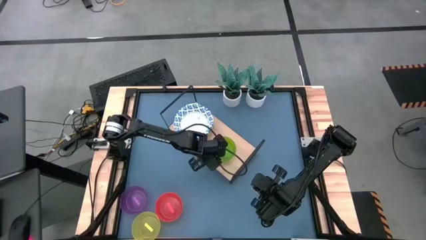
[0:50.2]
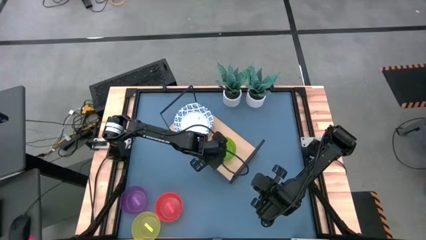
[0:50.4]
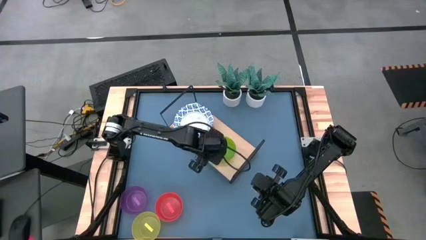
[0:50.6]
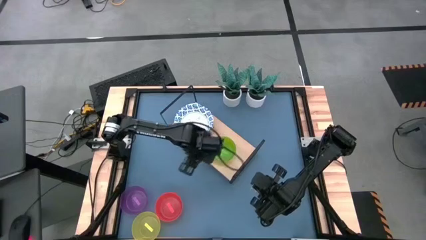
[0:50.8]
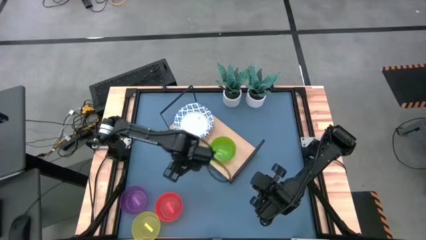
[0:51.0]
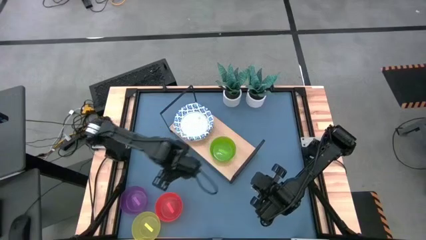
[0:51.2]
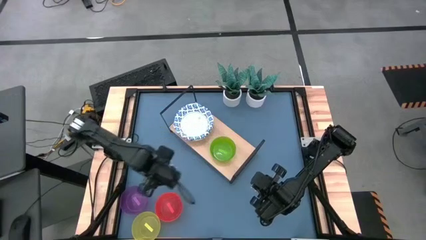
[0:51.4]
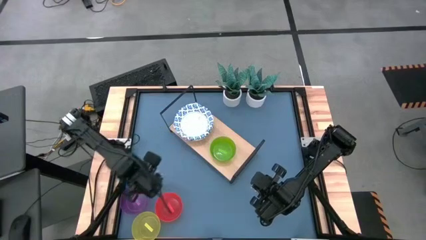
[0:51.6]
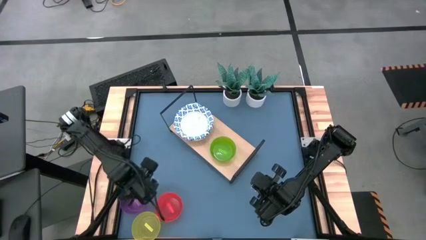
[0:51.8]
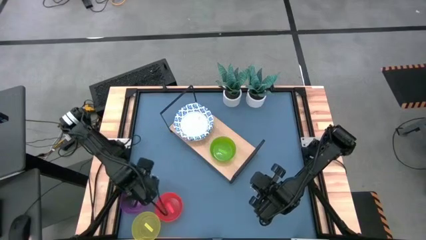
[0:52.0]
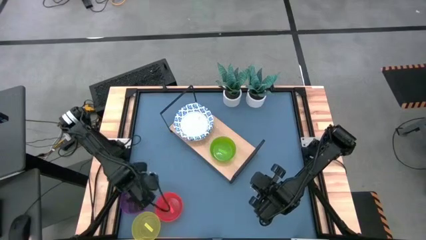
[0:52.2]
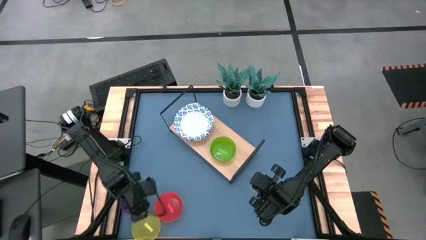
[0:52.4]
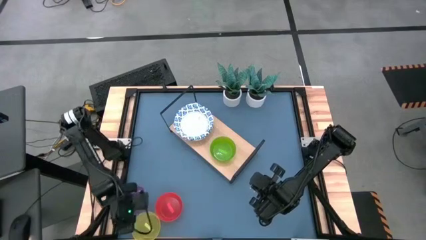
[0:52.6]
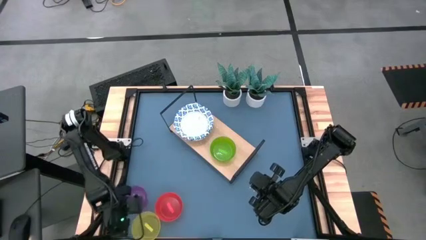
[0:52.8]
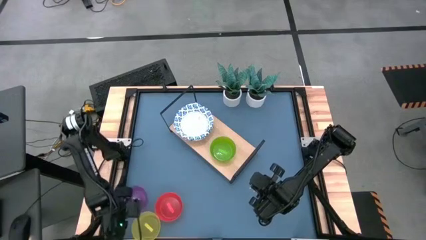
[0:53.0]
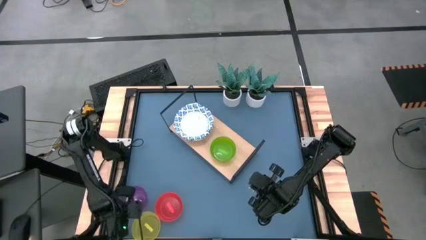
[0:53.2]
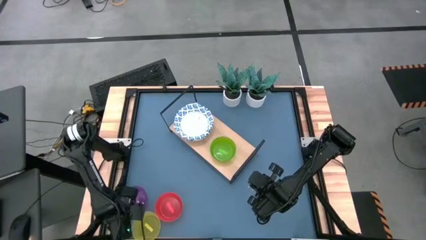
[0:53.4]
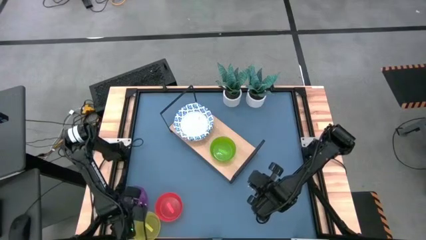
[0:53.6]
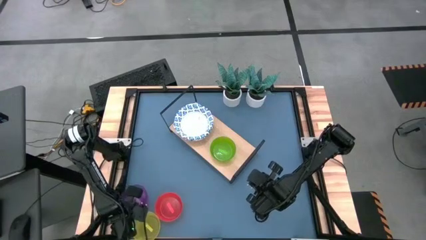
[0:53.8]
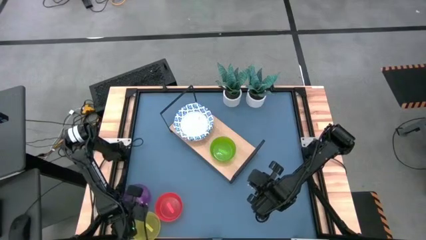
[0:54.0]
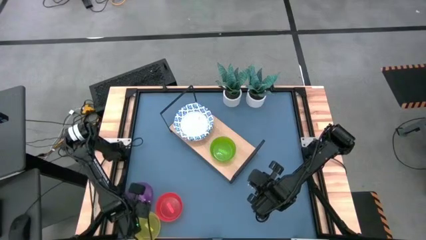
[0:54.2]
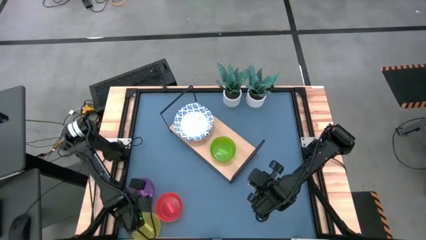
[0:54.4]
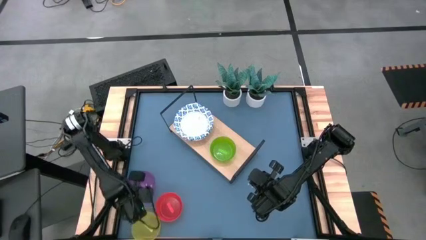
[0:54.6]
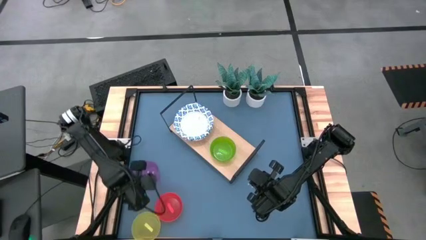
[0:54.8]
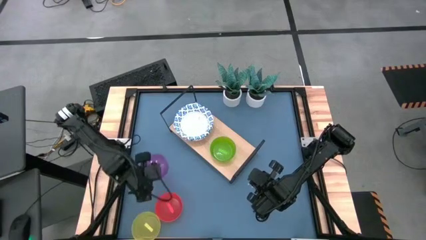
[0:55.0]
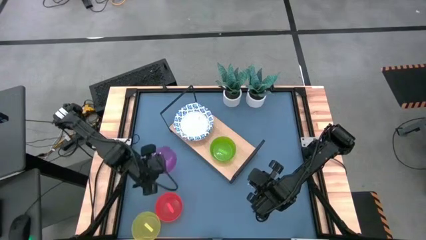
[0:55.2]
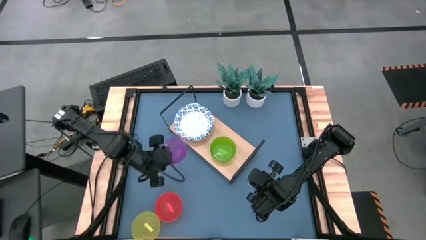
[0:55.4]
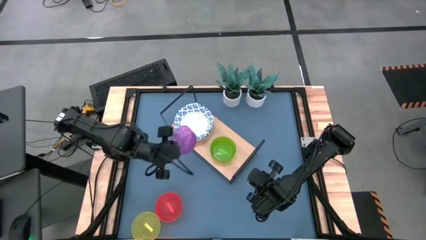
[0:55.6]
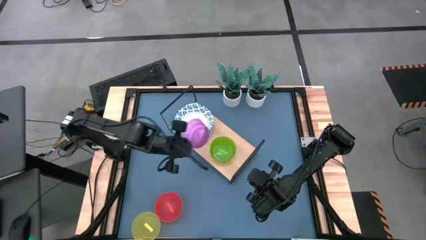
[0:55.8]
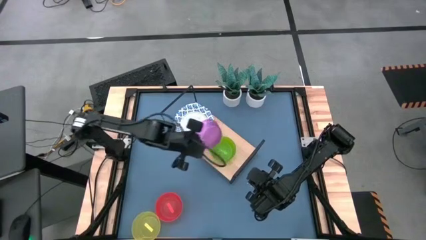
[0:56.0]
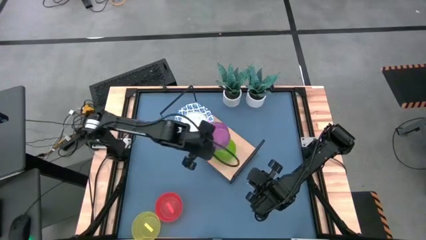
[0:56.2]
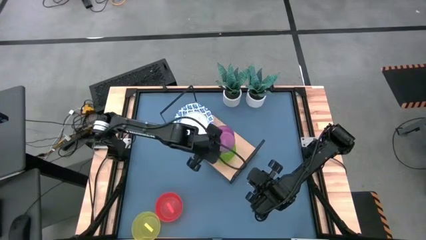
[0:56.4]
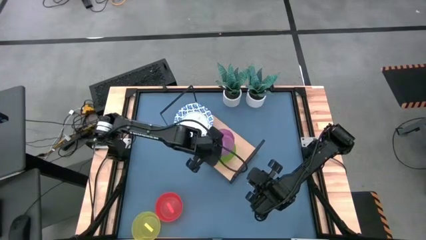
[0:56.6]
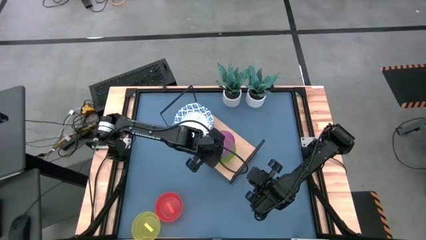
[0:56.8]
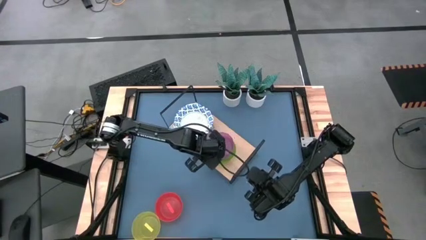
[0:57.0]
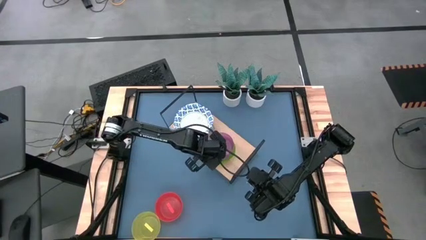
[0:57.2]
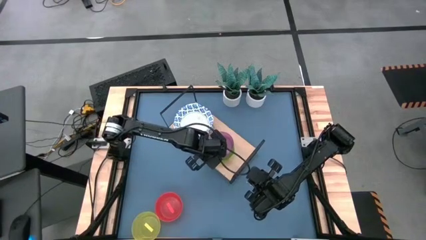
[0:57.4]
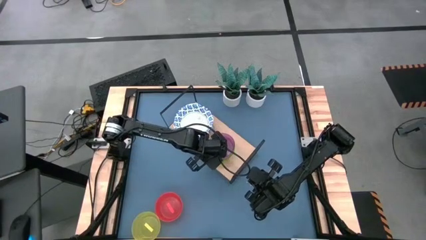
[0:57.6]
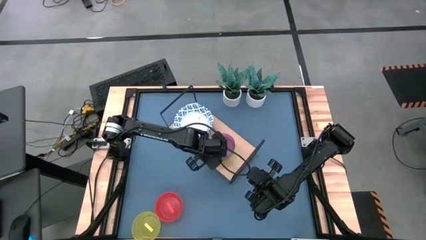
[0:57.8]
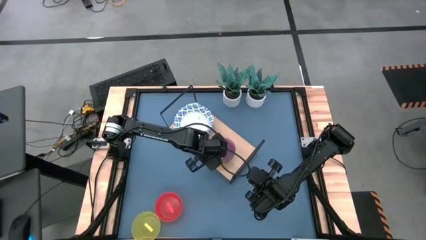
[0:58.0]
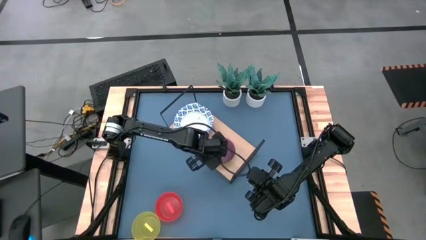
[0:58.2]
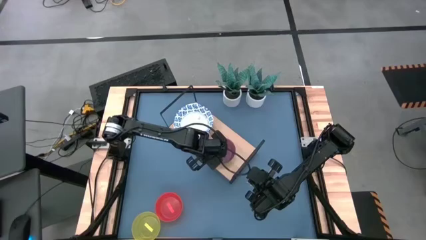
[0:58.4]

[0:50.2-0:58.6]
Task: Place and stack bowls onto a shelf
Stack the purple bowl on top of the green bowl on the shelf

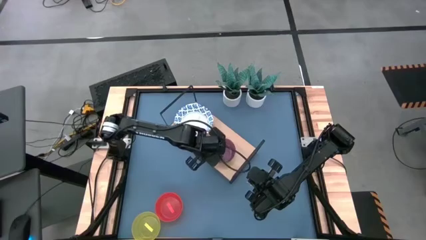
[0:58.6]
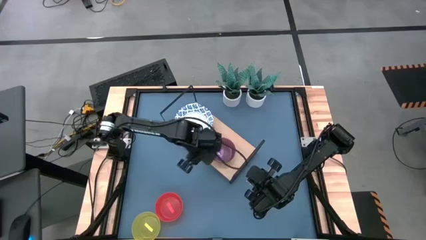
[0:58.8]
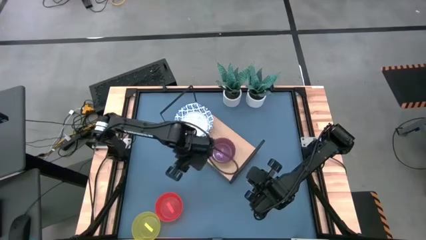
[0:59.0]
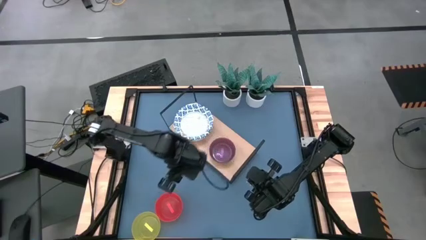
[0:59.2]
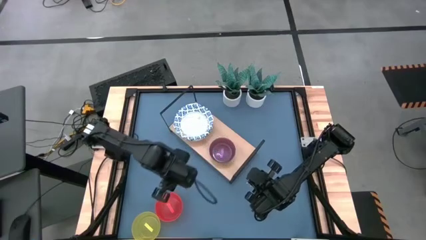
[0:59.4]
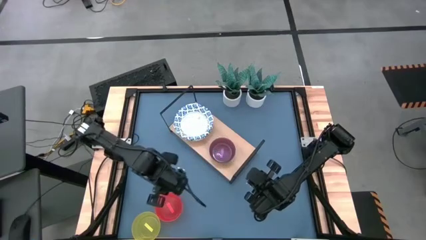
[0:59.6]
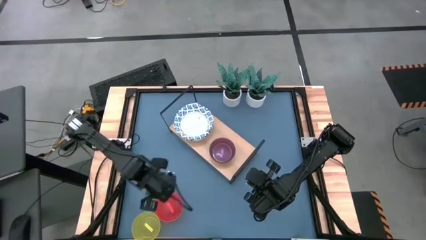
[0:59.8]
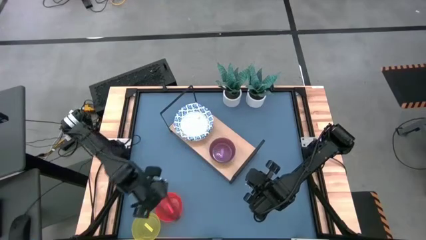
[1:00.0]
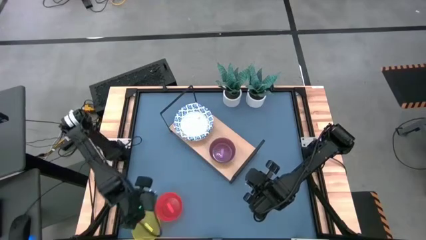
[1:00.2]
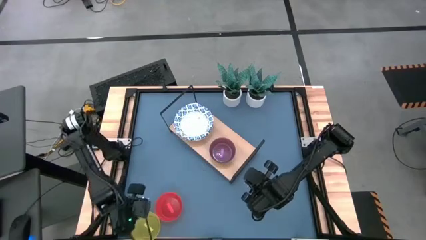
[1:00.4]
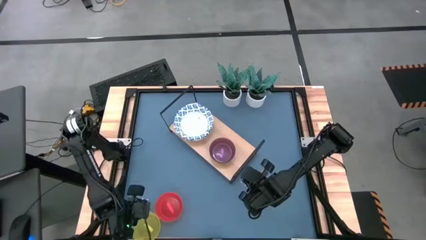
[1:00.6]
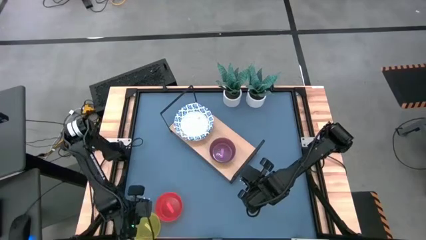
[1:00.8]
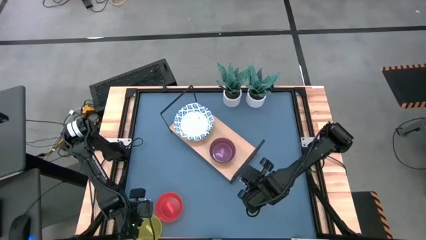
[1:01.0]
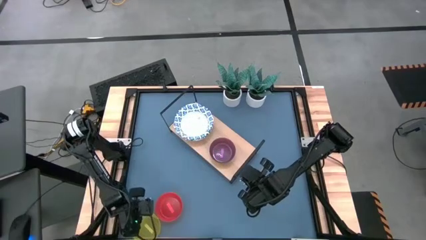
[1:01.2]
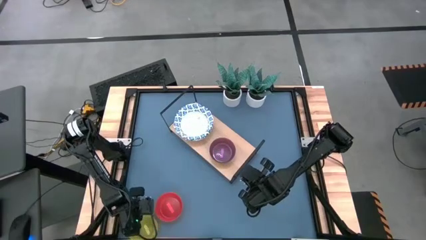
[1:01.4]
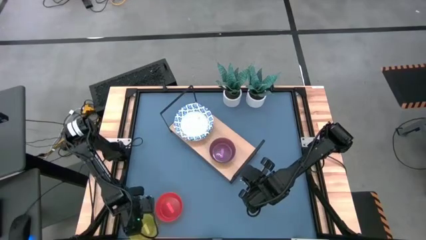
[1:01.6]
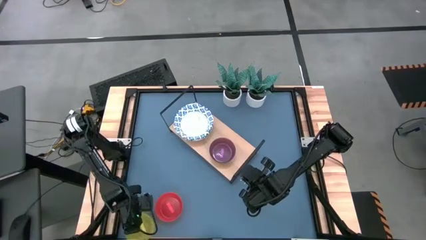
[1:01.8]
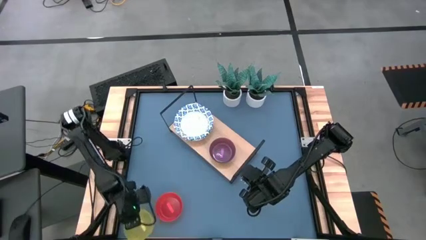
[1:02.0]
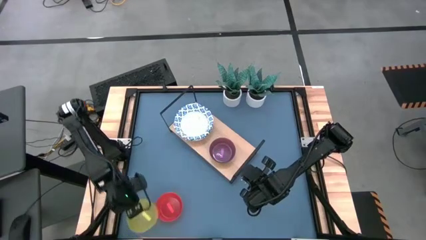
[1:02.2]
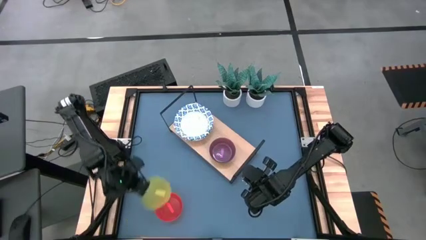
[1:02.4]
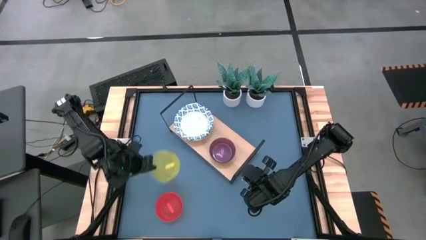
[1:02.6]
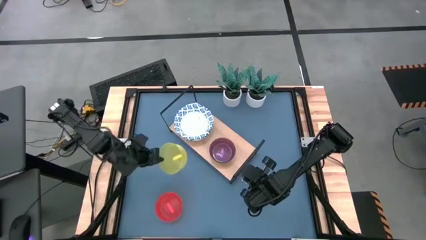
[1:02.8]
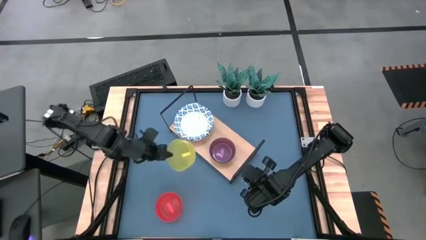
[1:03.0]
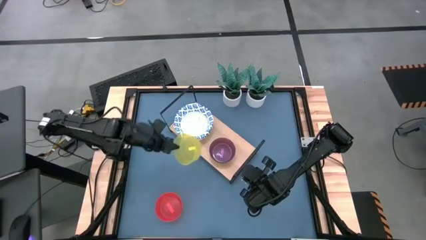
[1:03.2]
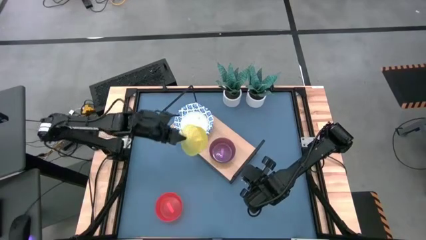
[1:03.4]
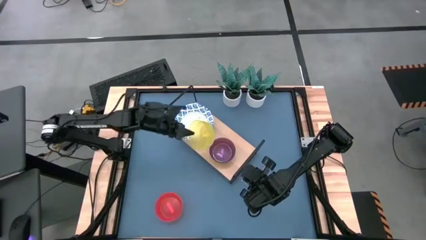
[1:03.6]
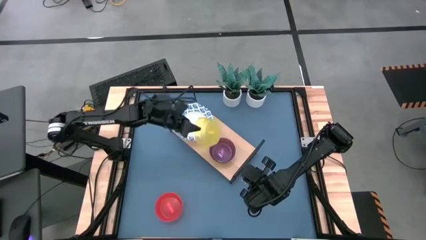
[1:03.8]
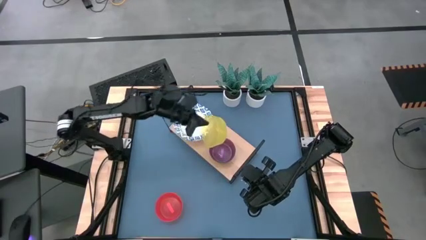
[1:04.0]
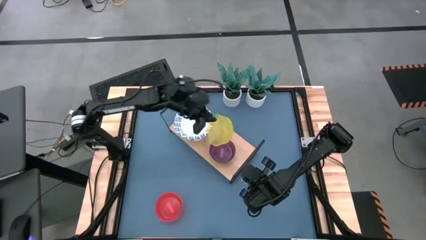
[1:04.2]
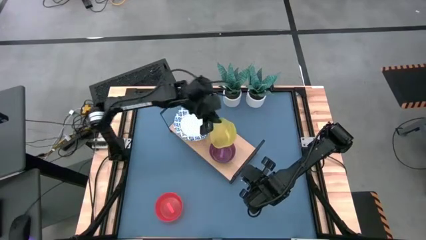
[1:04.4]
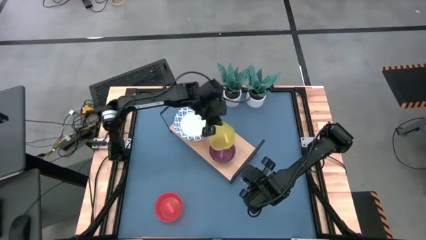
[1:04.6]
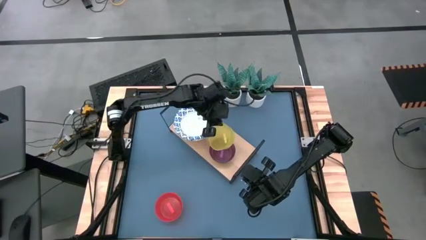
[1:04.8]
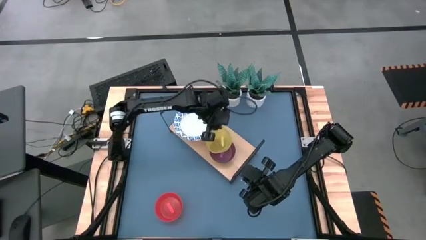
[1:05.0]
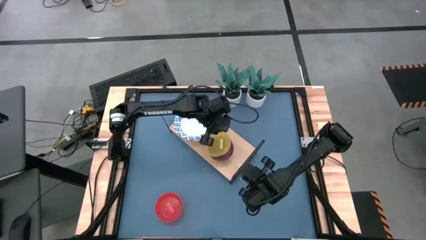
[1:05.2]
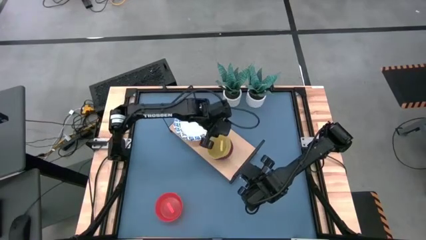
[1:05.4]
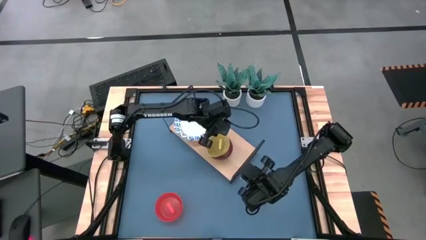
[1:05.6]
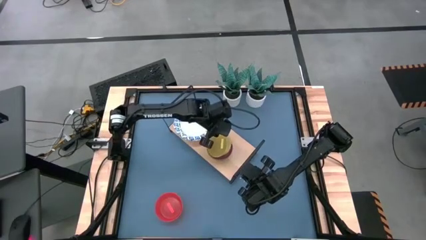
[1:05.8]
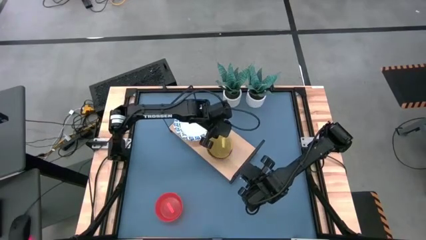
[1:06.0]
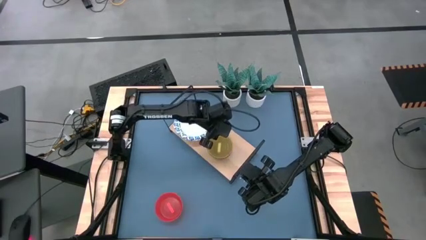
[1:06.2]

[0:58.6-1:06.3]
Stack the yellow bowl on top of the purple bowl on the shelf
